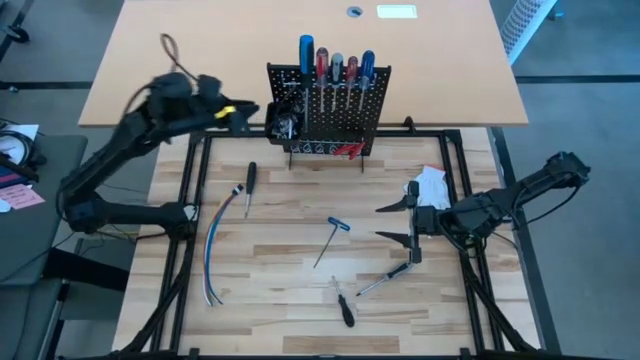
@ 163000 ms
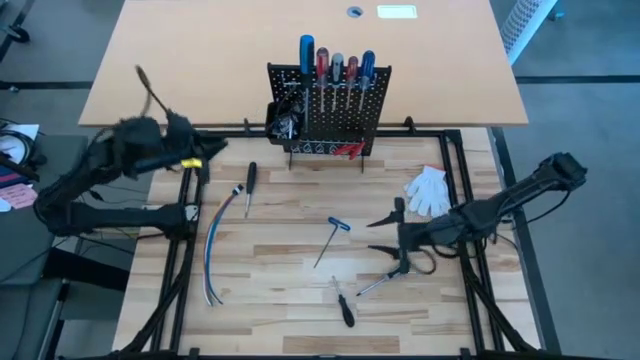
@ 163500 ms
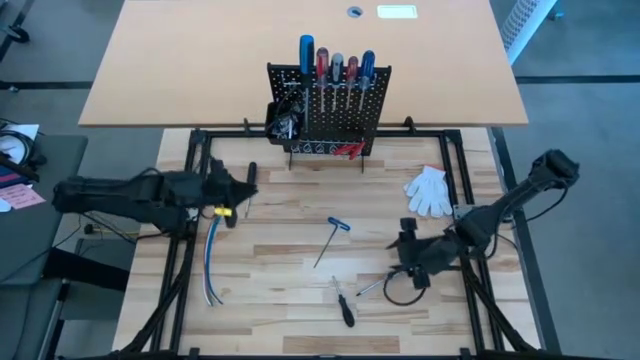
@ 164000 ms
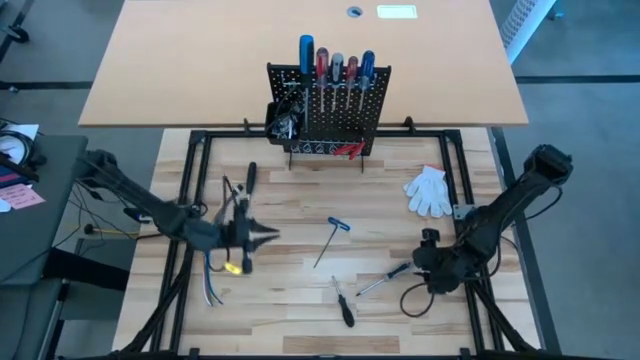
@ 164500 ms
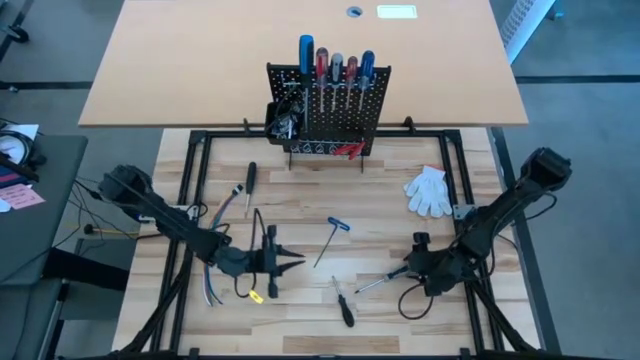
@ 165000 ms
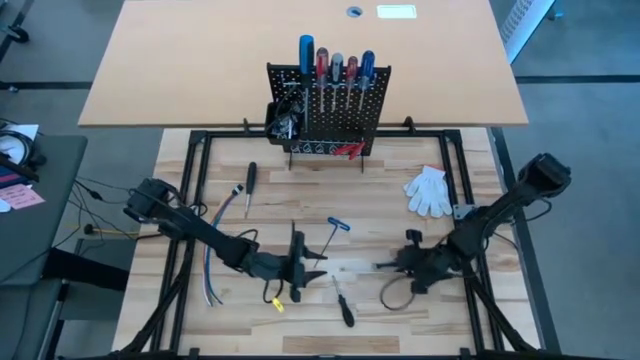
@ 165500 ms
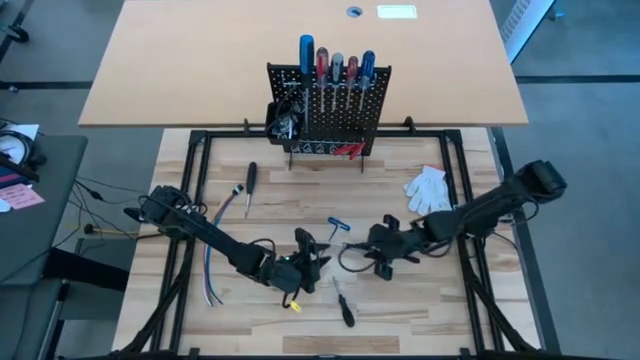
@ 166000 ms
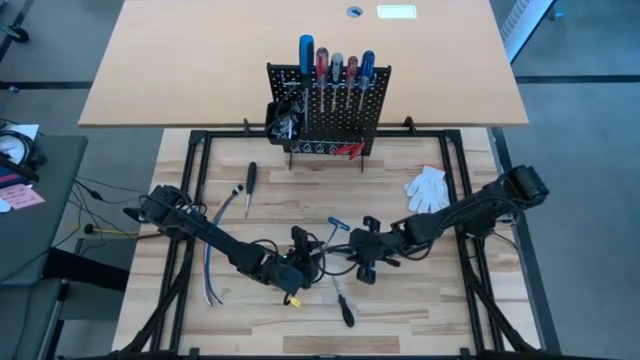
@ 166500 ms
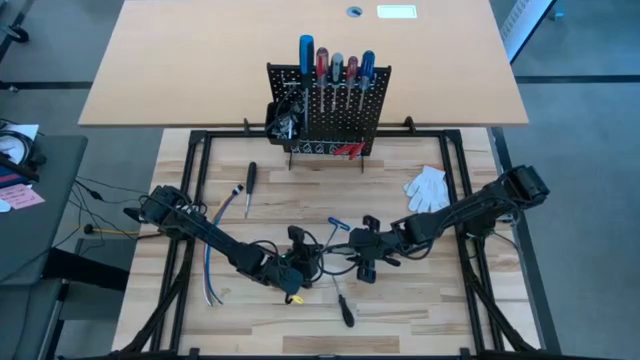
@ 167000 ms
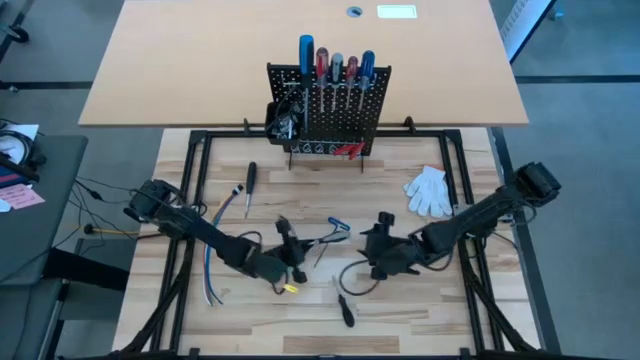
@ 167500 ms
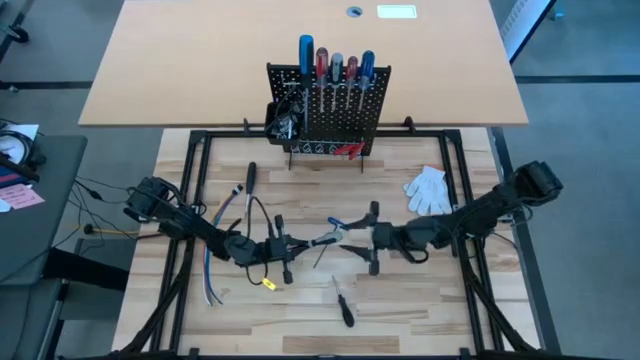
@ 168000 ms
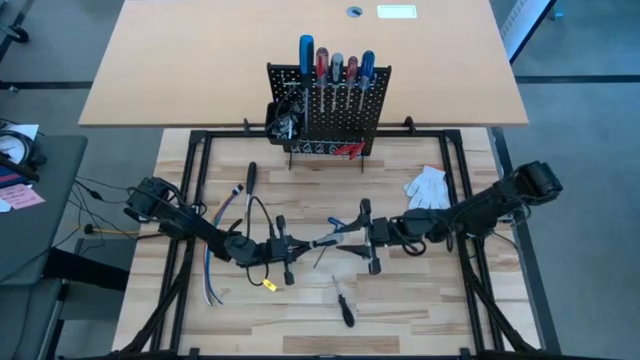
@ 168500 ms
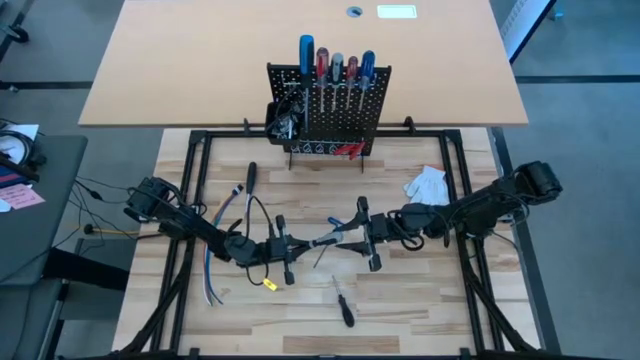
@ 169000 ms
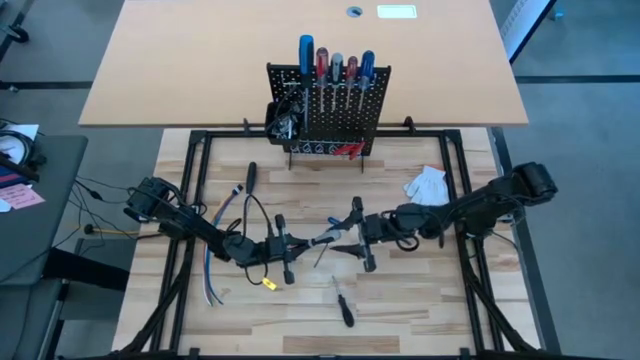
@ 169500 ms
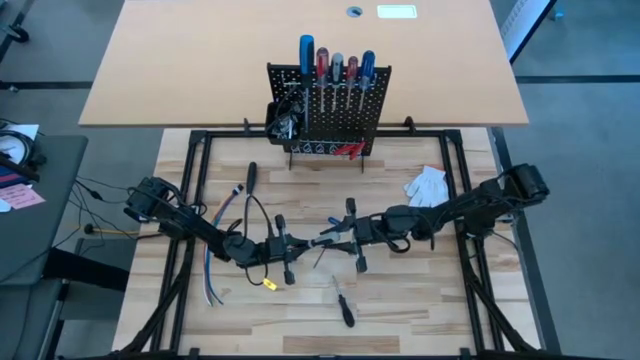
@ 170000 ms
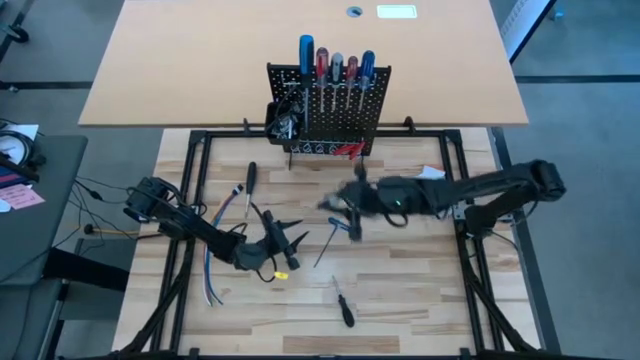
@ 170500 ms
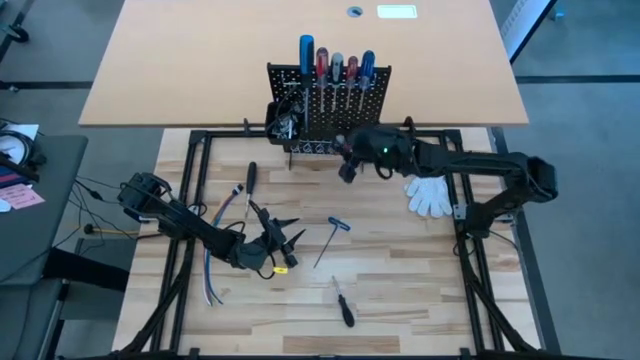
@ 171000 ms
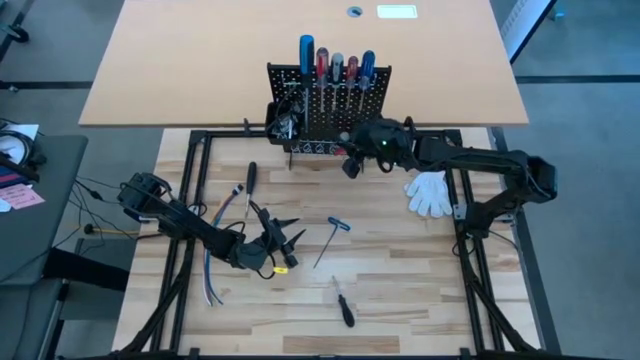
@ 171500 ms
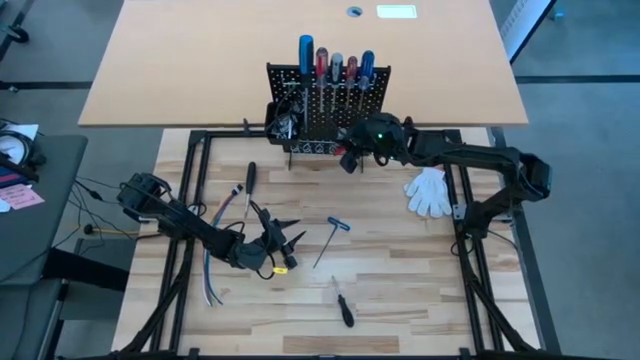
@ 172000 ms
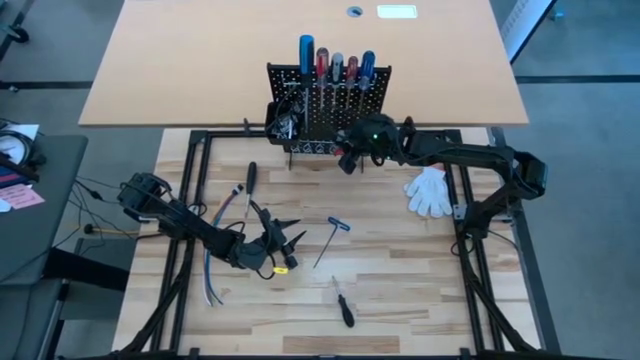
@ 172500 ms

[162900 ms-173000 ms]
Task: Hang tools onto peg board
Hang the gray screwdriver on the black pegboard

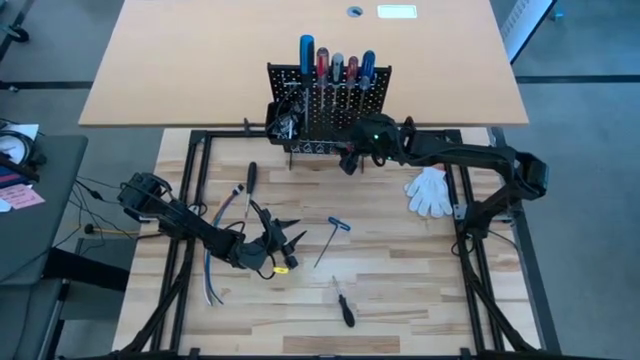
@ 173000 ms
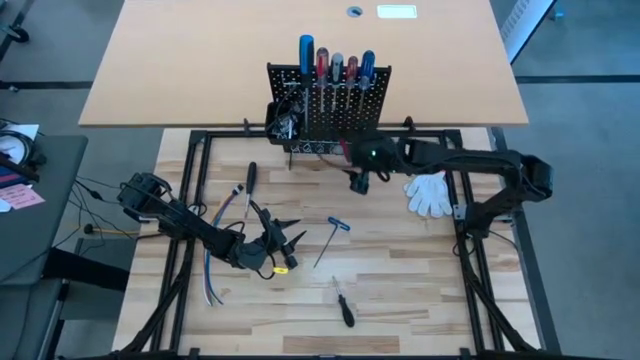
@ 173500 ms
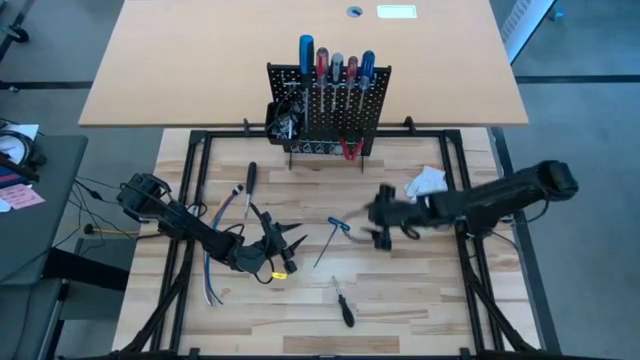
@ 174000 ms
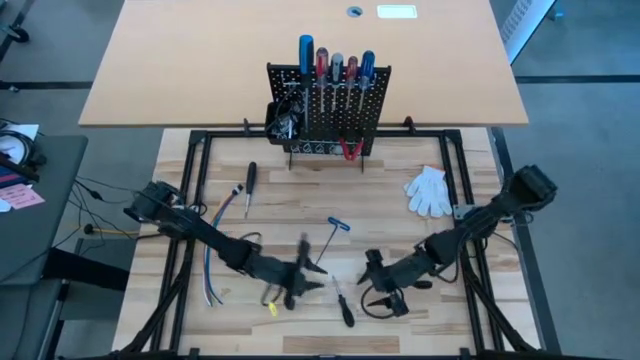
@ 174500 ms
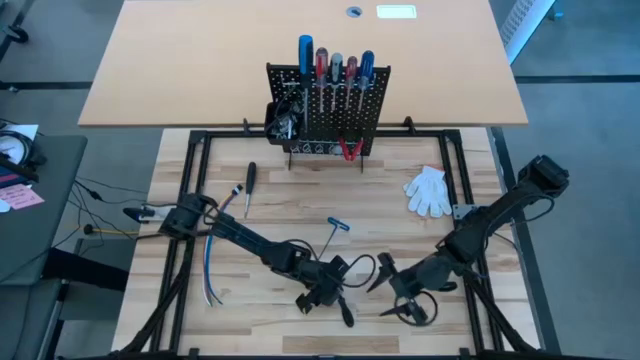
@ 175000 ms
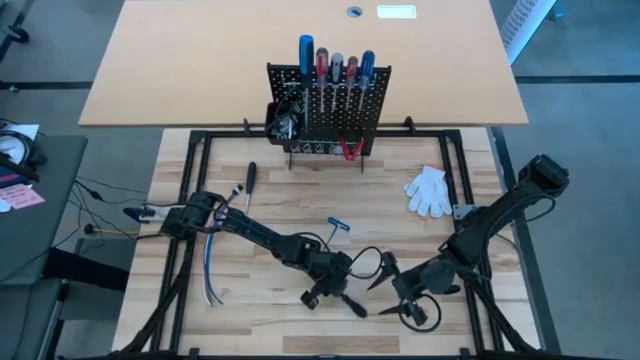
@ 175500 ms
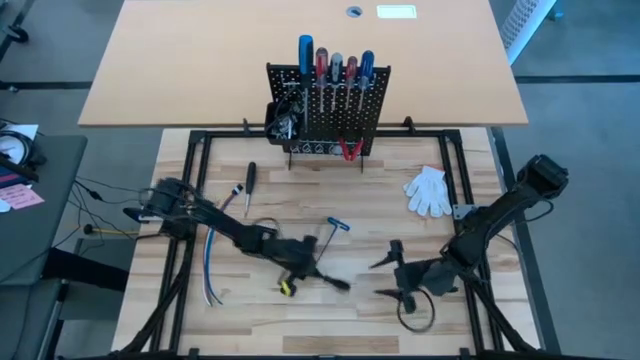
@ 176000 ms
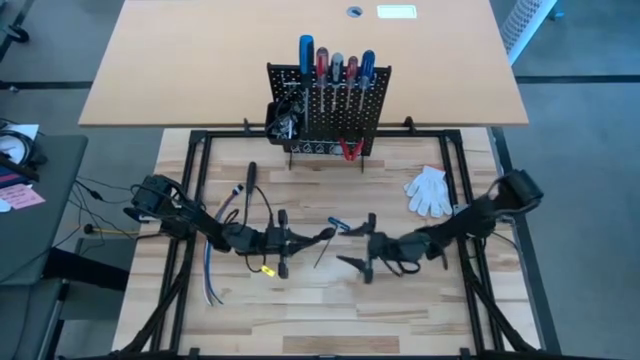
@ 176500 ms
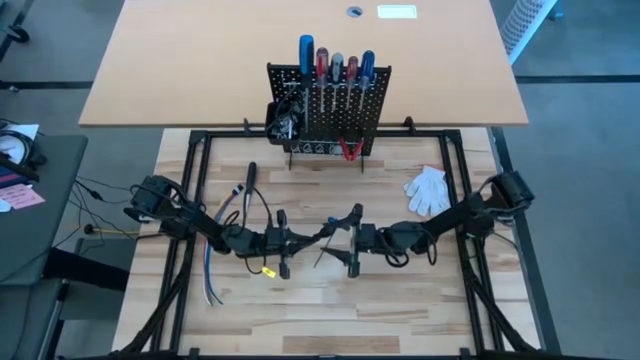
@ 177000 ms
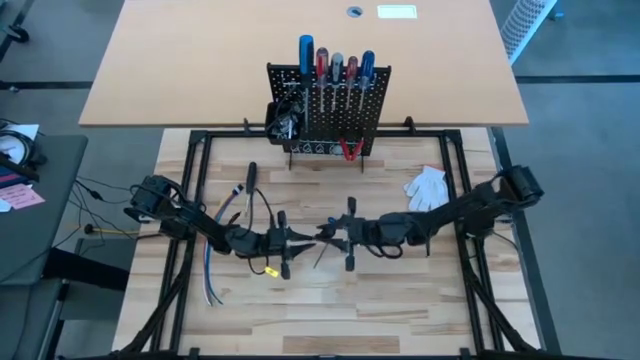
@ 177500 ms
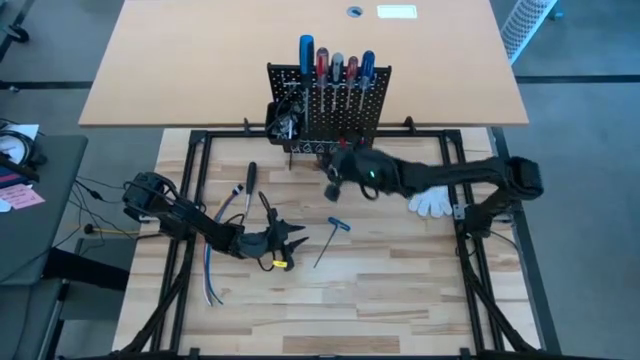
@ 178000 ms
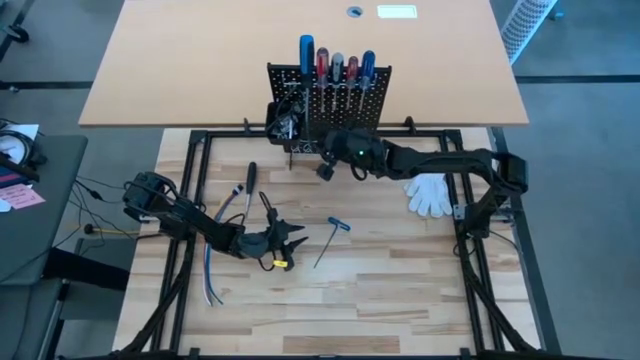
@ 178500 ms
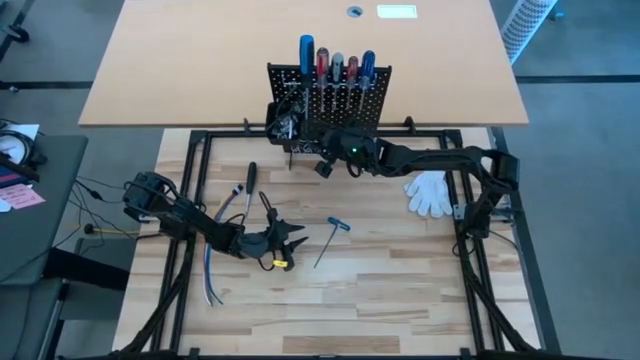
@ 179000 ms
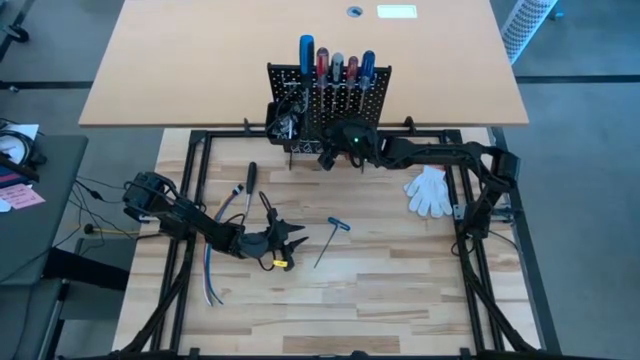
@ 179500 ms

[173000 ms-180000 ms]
Hang the black screwdriver on the black pegboard

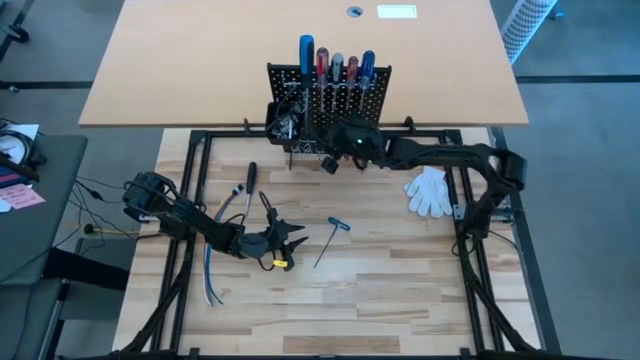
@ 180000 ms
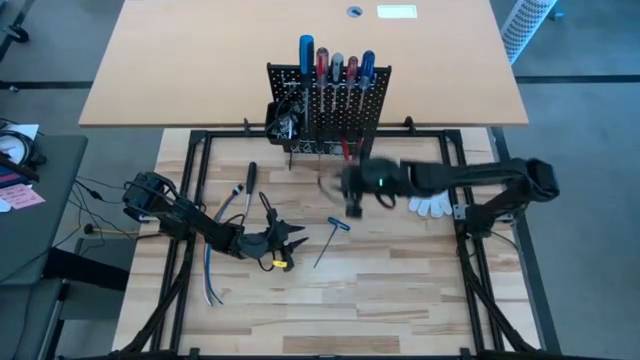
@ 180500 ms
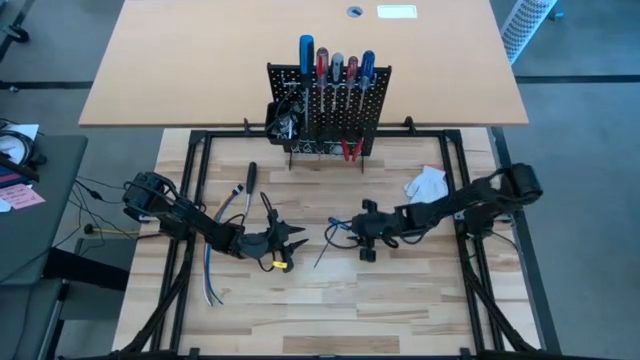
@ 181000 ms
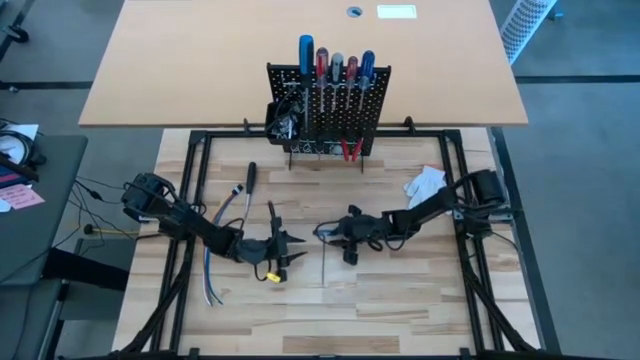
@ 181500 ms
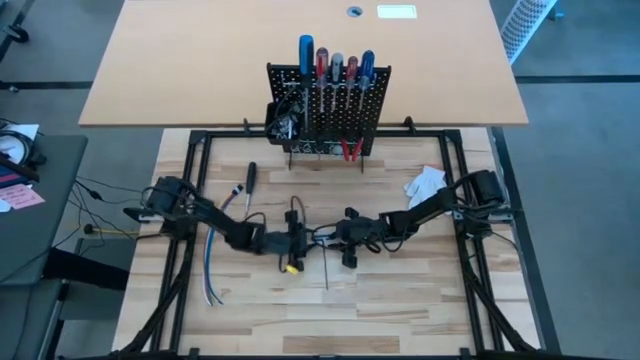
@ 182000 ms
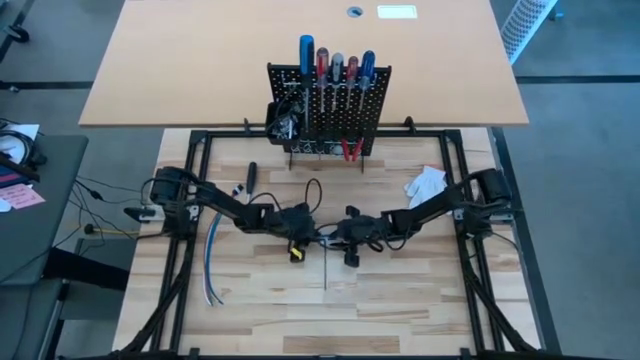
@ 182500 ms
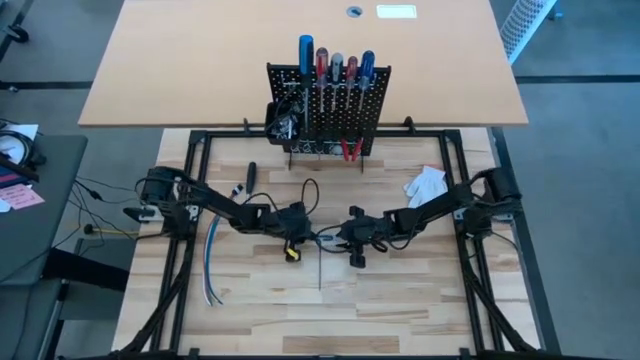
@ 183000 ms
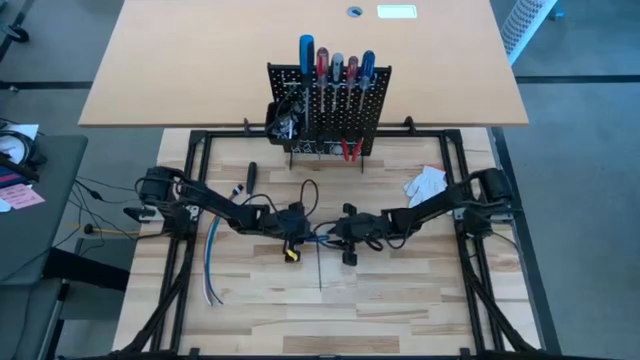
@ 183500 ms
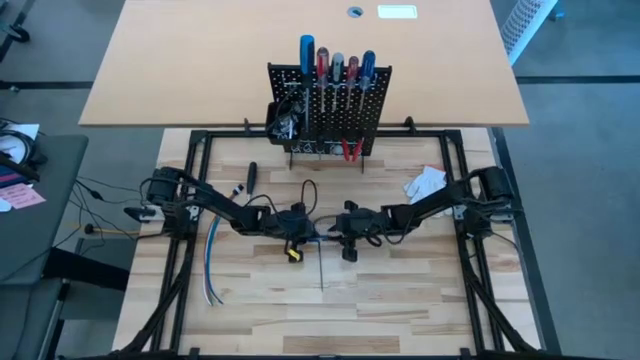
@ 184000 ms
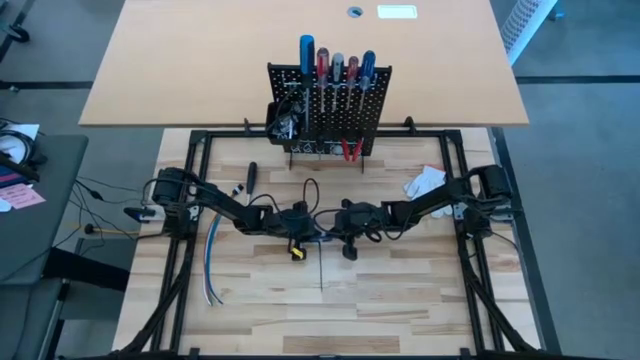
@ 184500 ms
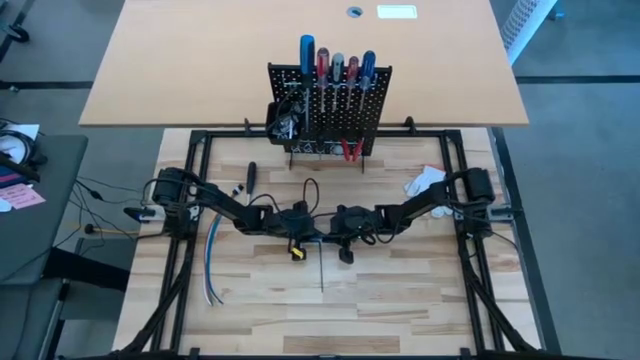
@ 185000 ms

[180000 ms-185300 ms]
Hang the blue pick tool on the black pegboard
